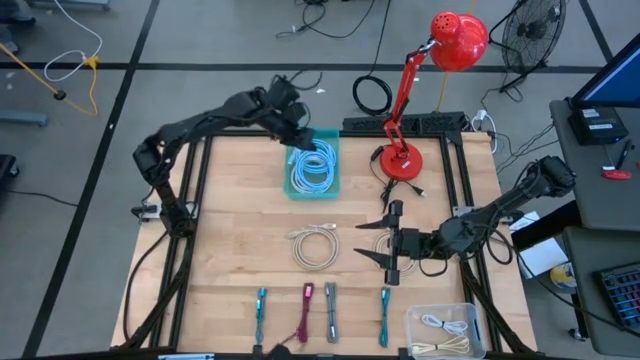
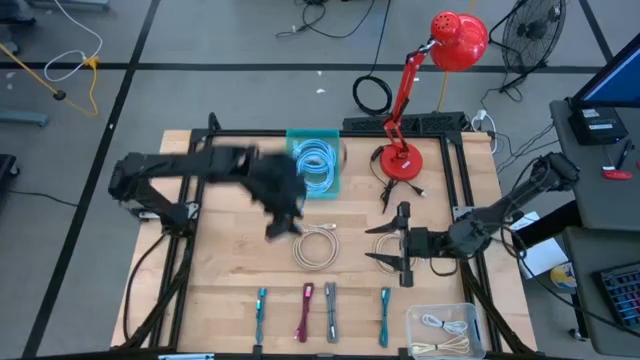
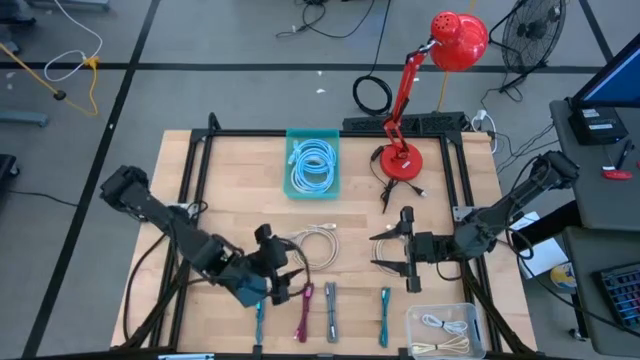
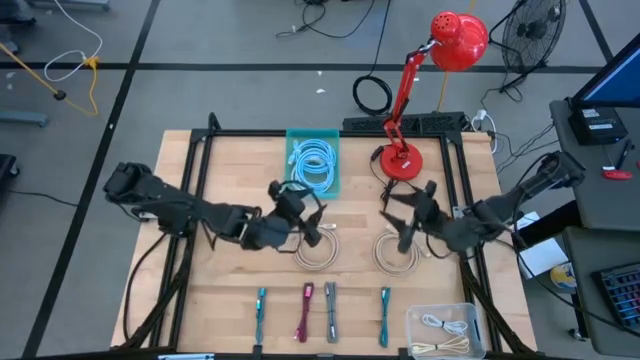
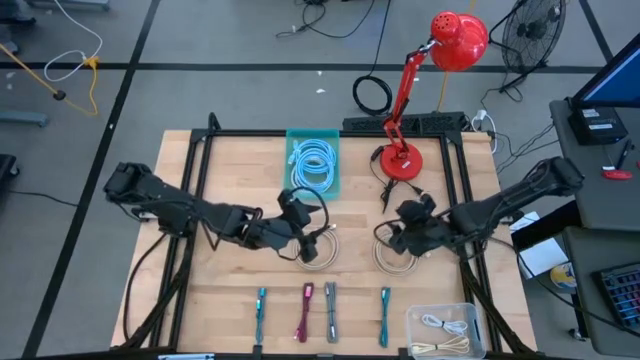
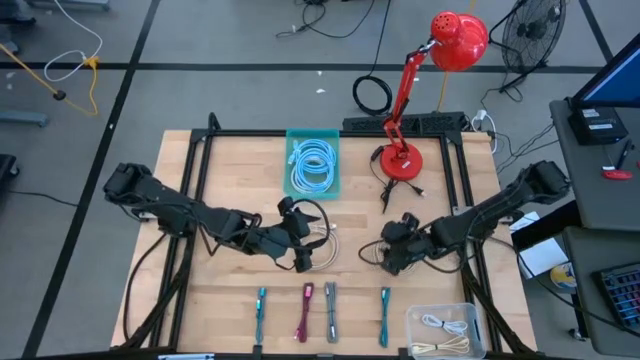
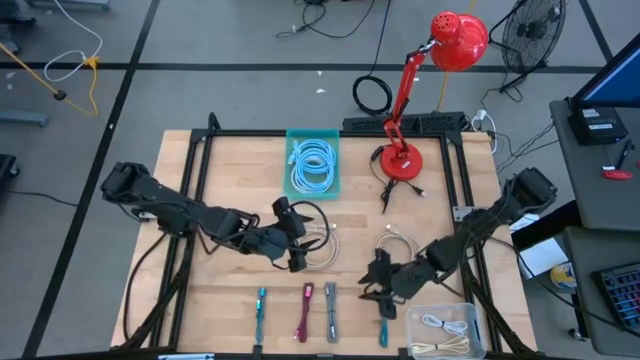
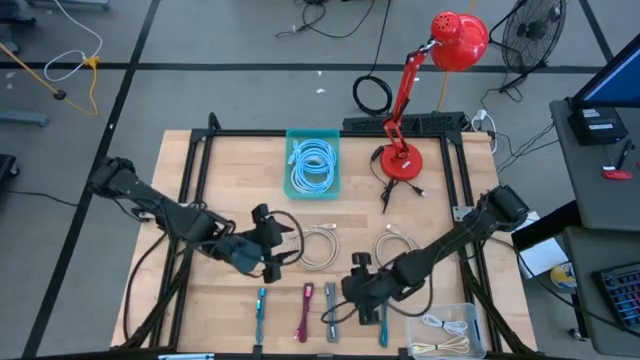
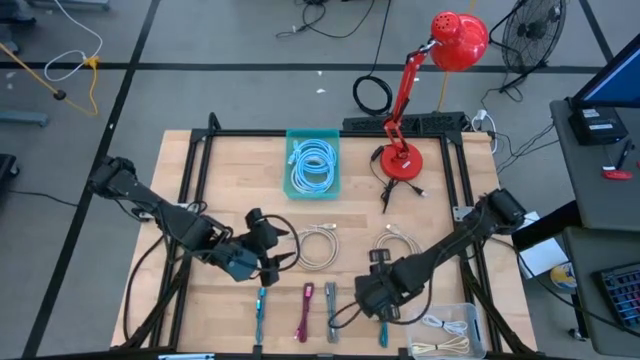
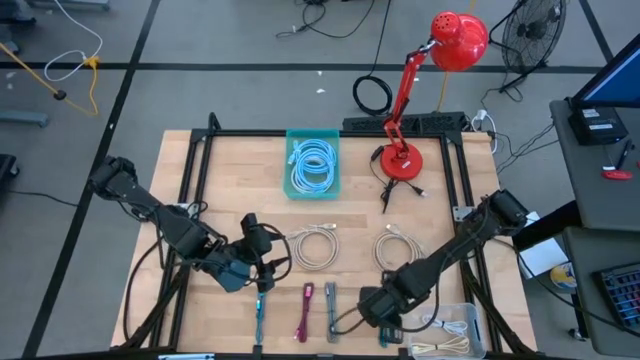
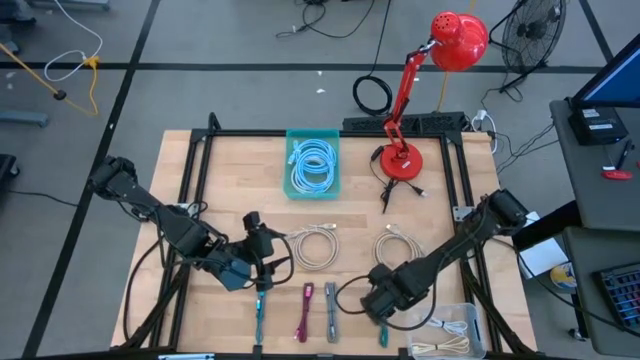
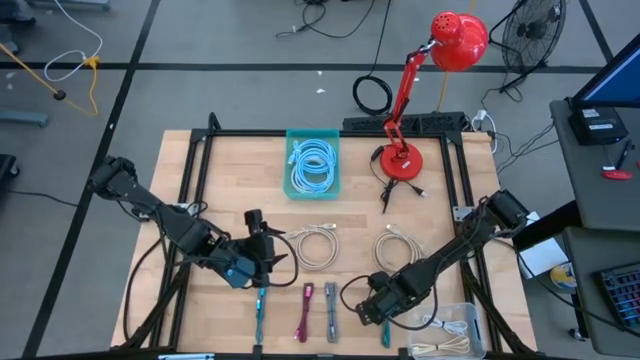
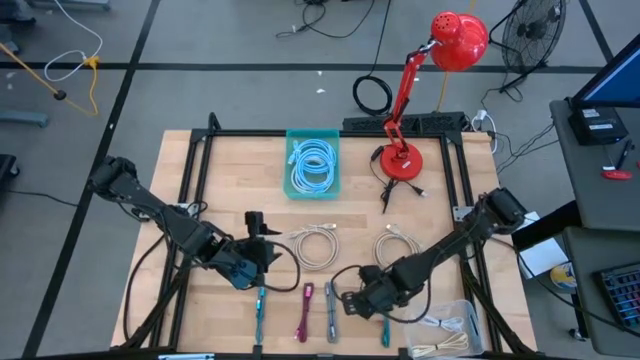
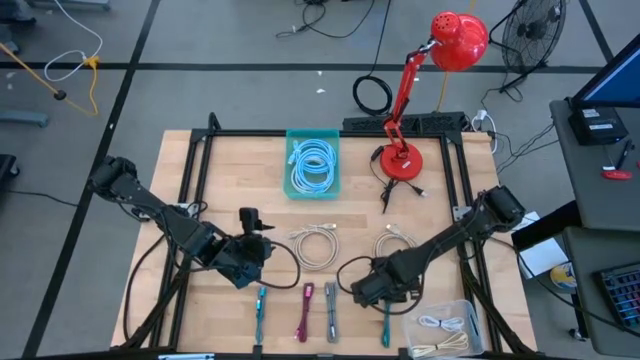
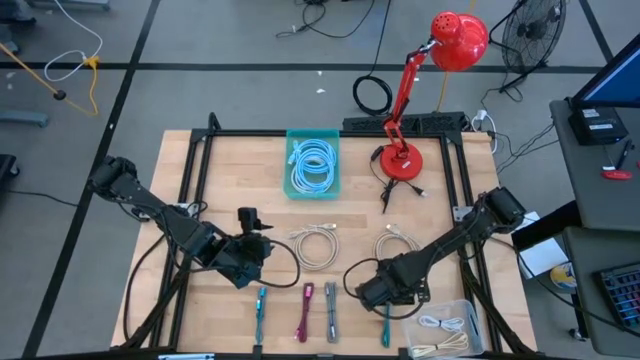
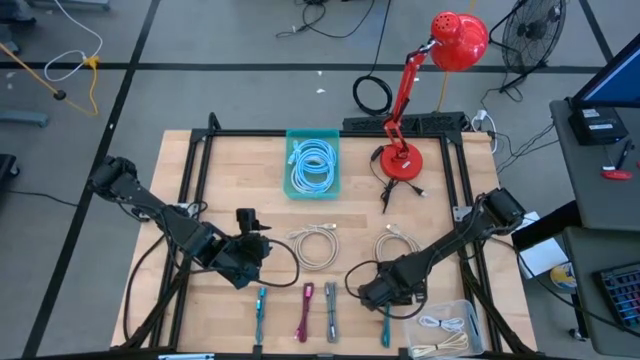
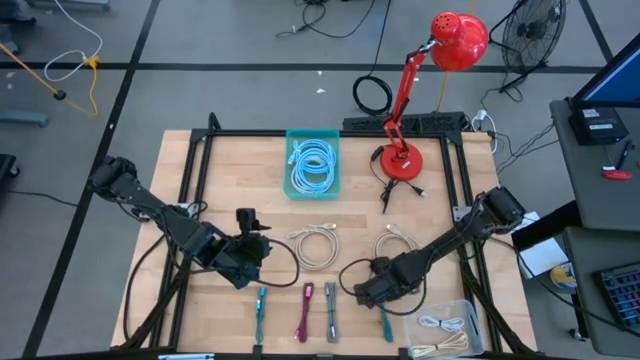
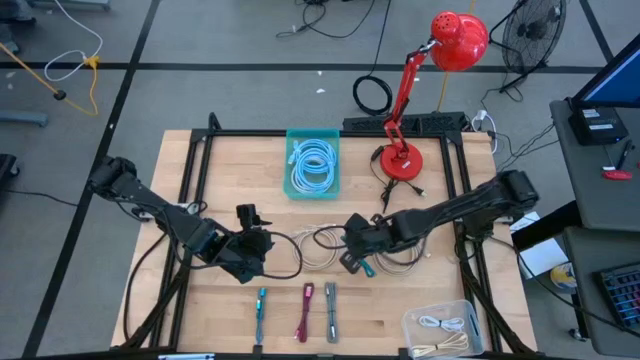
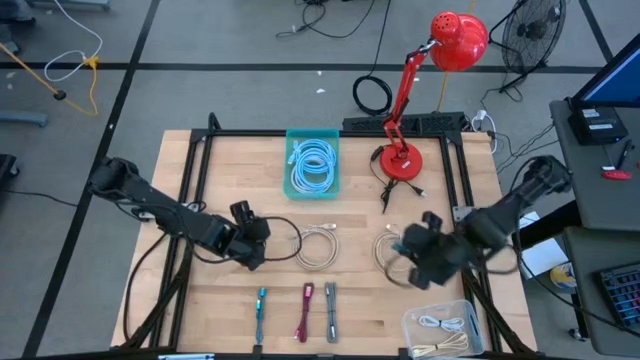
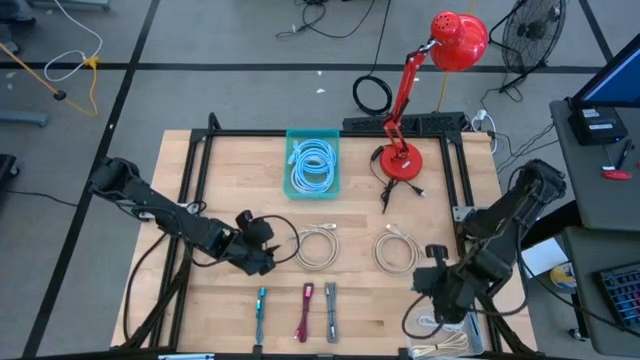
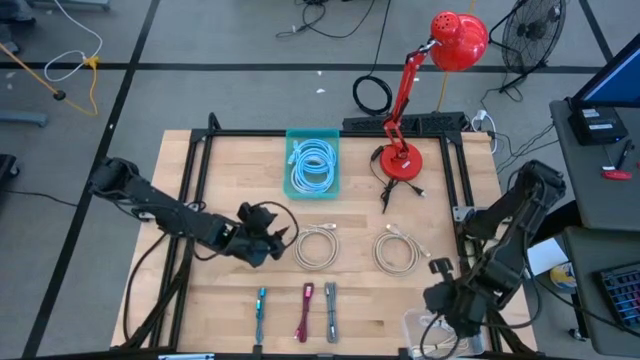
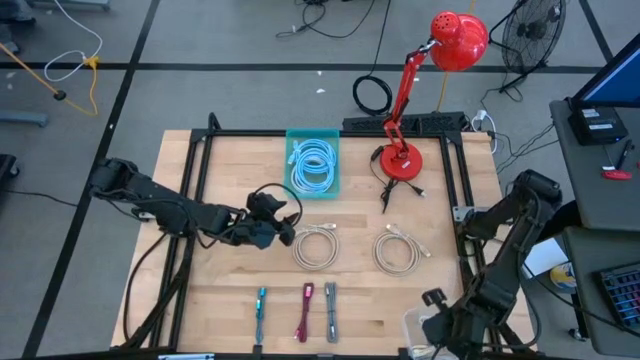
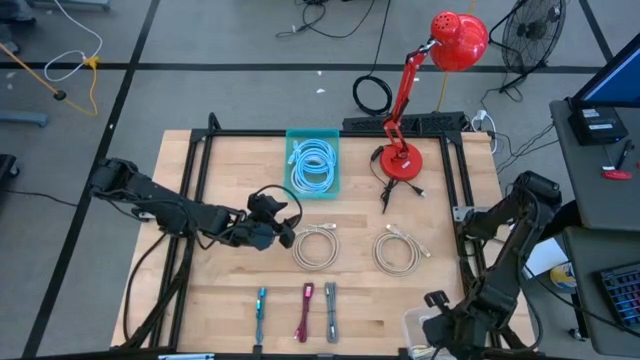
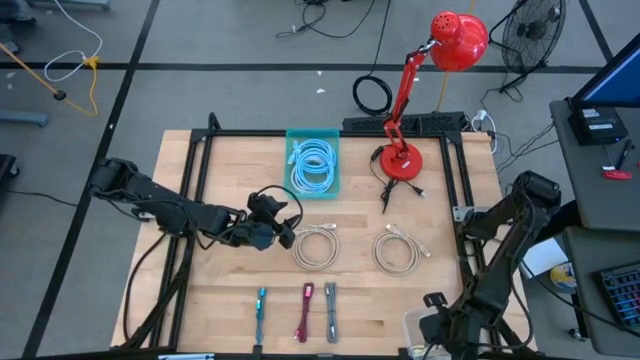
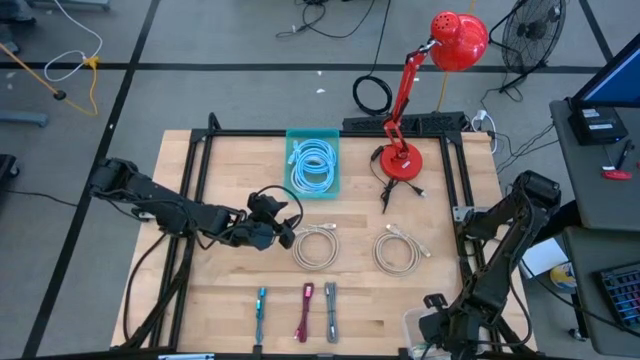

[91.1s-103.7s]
Task: Pick & Place USB Port
Put the right blue USB cable into the transparent bin

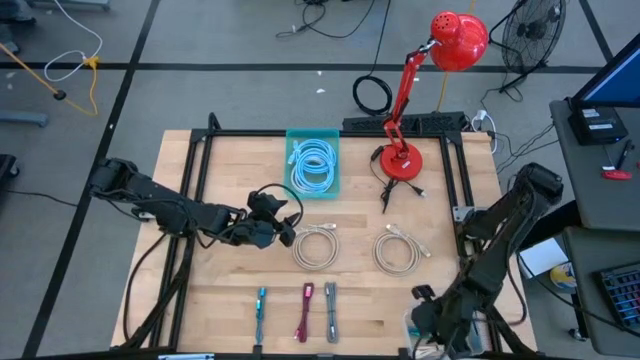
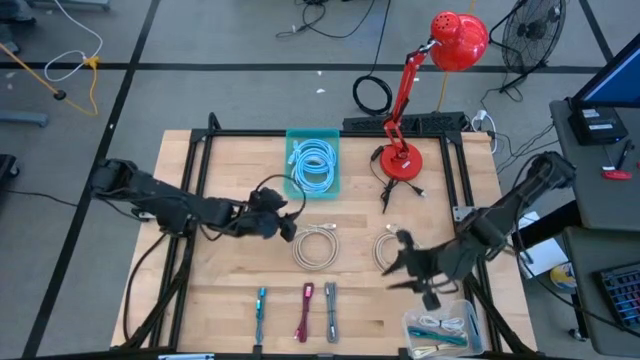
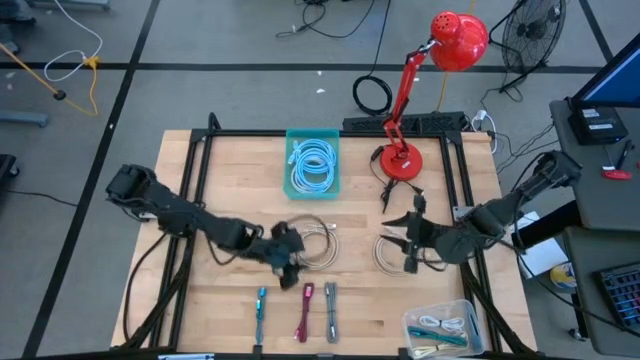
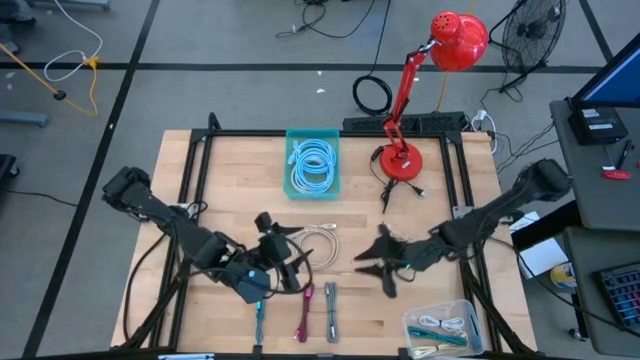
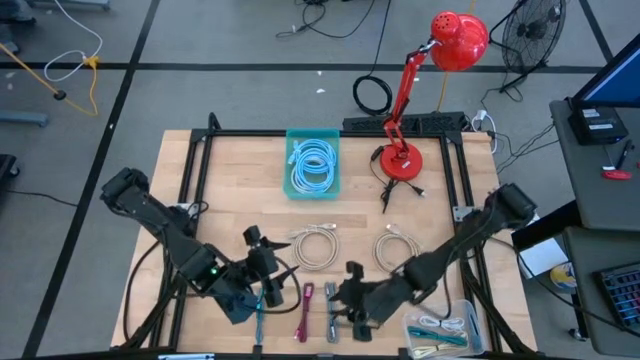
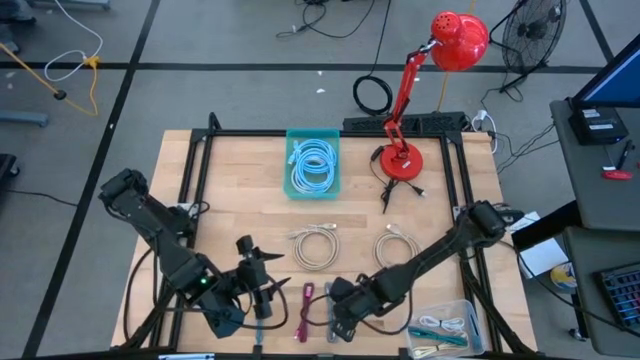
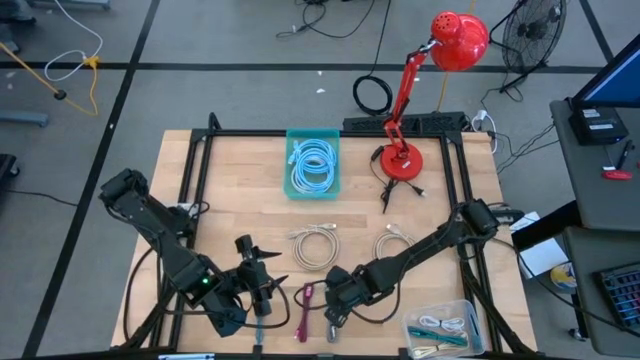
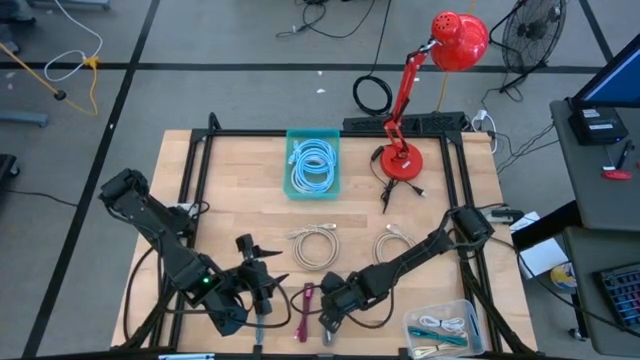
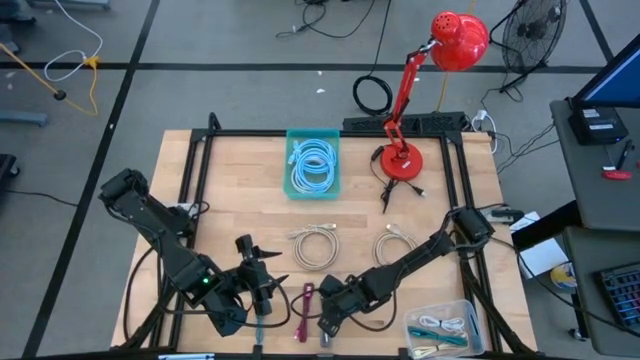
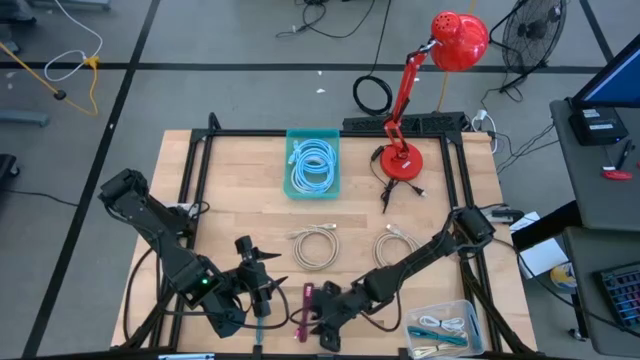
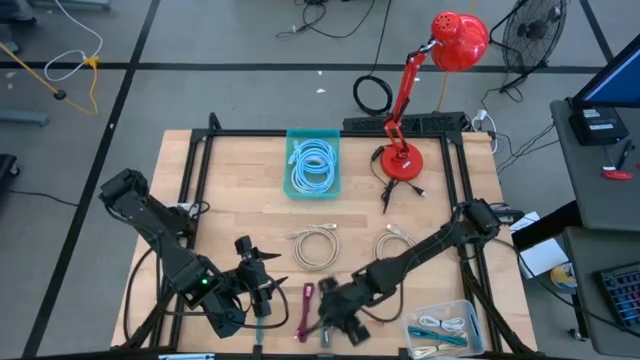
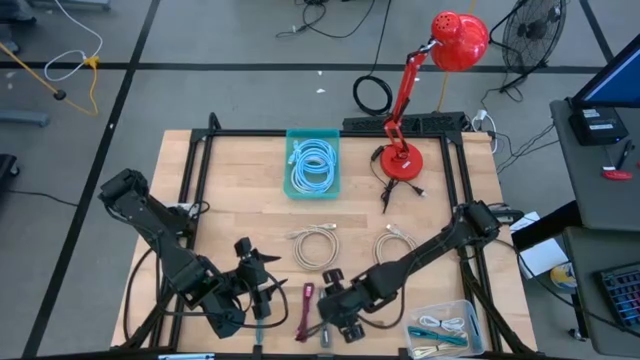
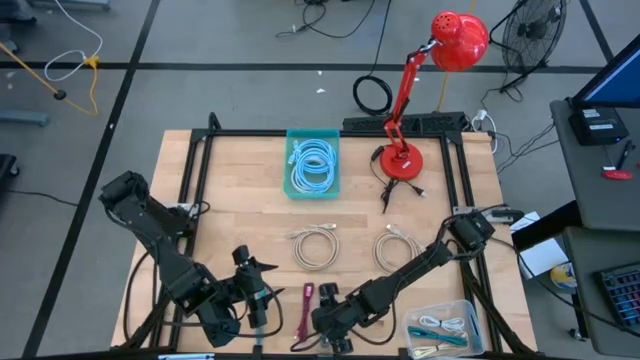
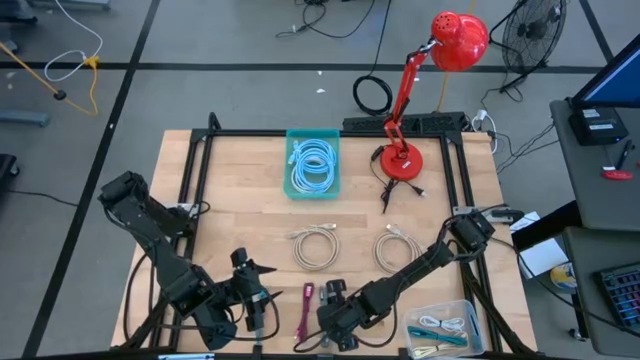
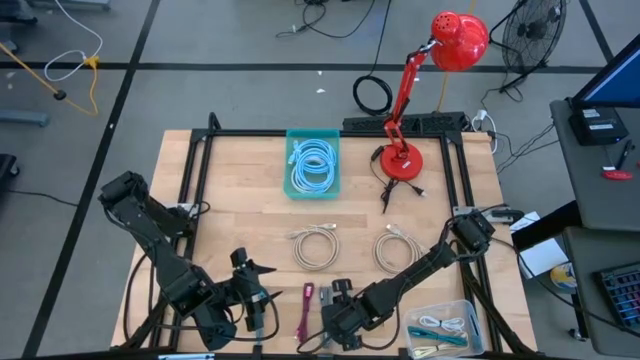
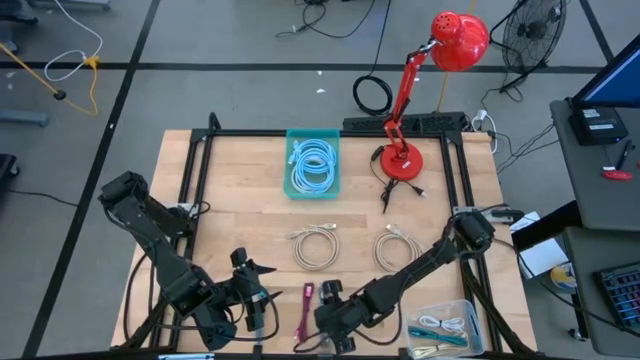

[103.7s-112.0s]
Put the gray USB cable into the transparent bin

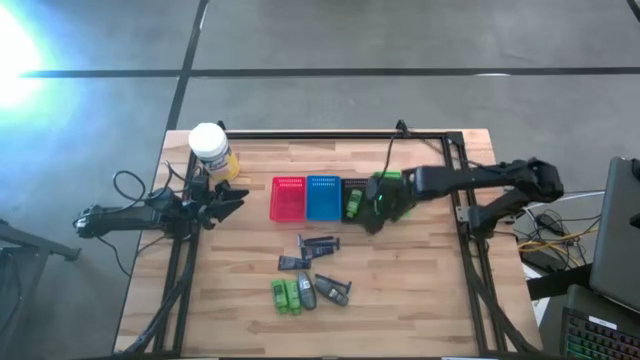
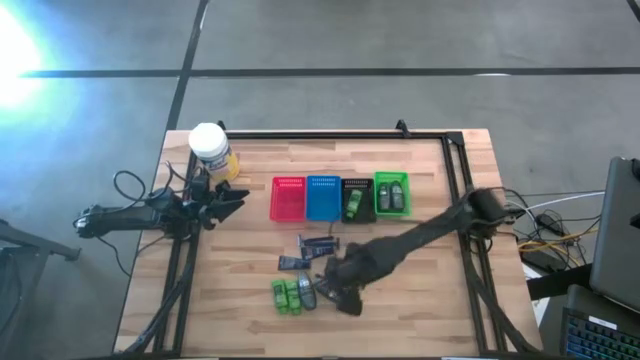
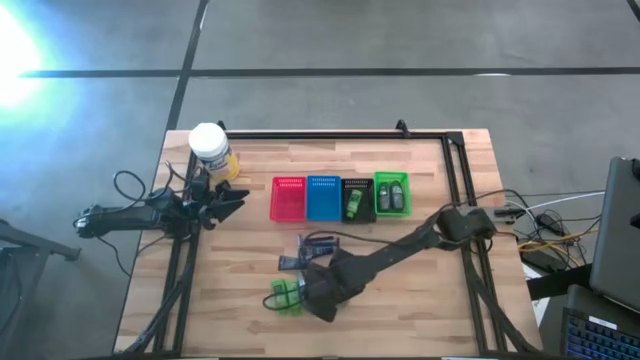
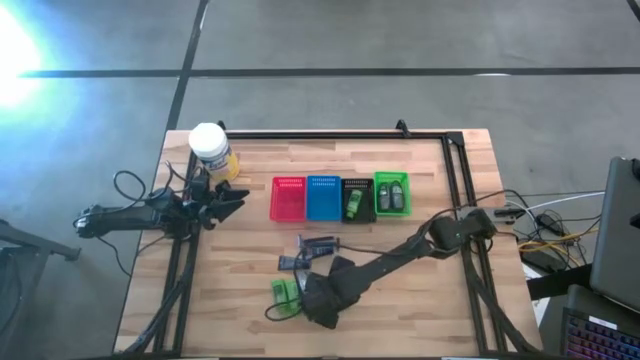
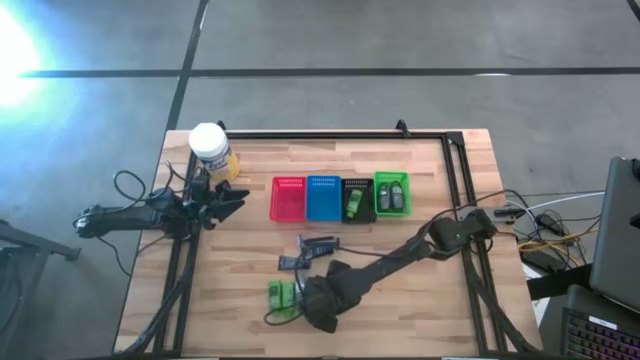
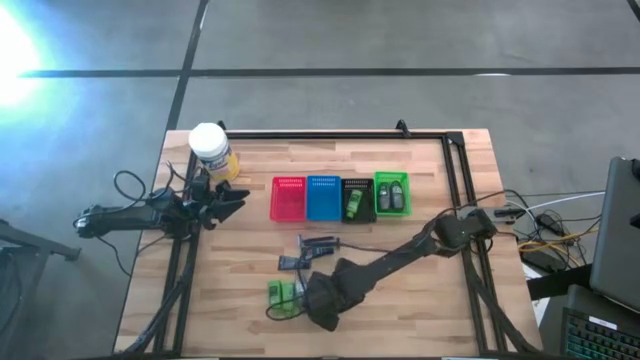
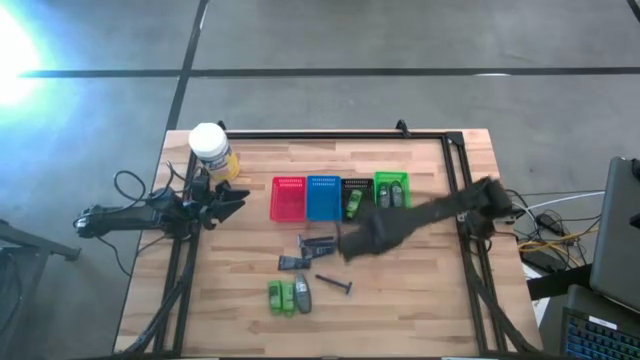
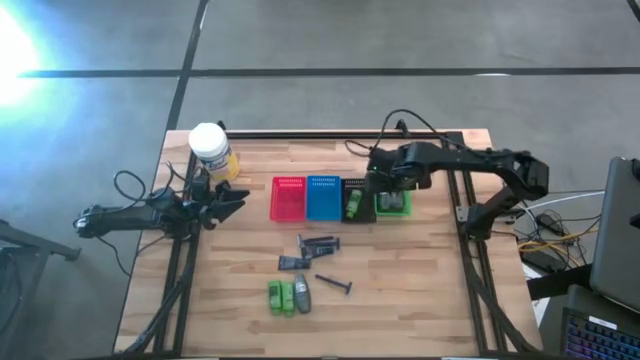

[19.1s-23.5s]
Task: Pick & Place Travel size toiletries
Put the deodorant into the green basket
